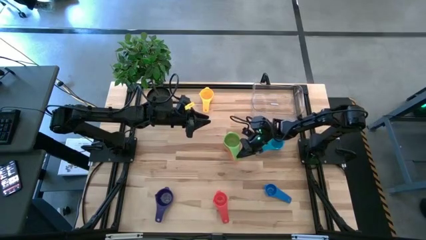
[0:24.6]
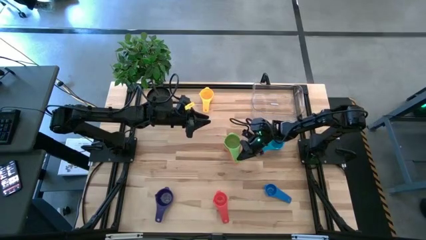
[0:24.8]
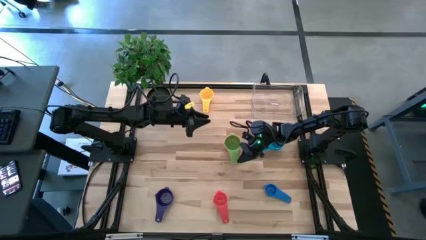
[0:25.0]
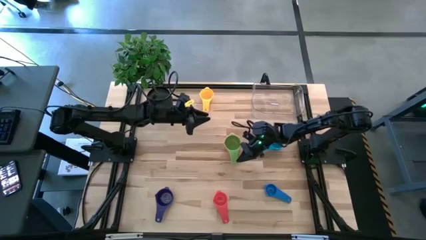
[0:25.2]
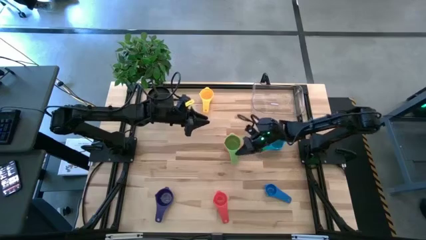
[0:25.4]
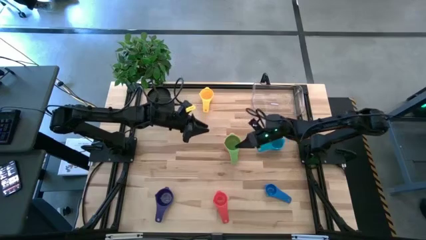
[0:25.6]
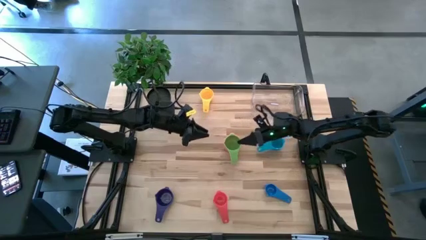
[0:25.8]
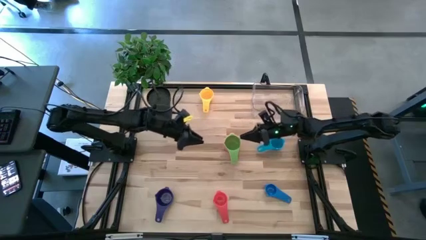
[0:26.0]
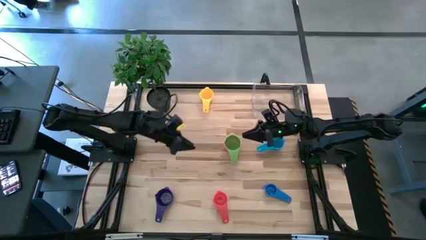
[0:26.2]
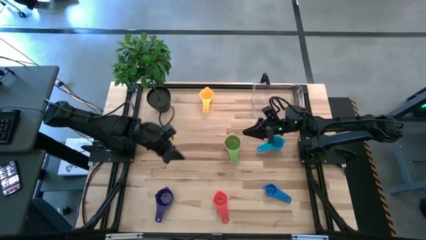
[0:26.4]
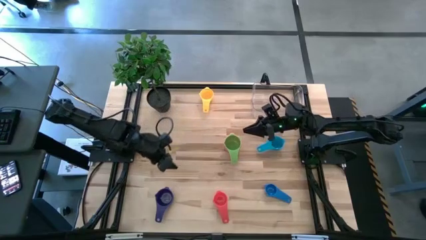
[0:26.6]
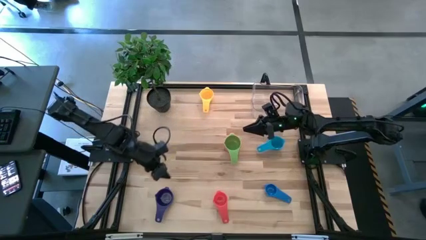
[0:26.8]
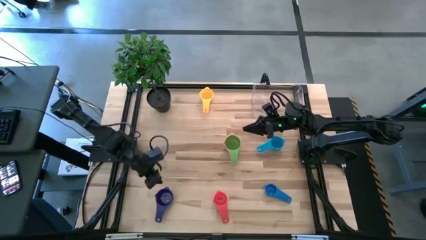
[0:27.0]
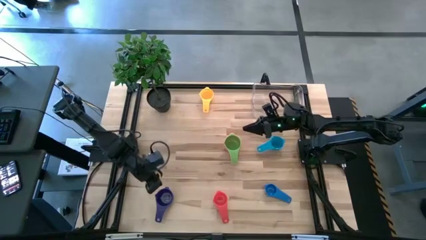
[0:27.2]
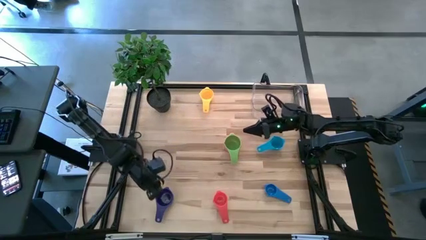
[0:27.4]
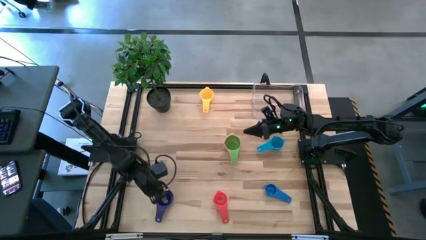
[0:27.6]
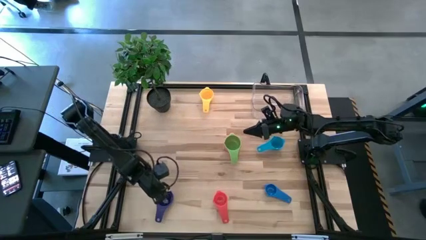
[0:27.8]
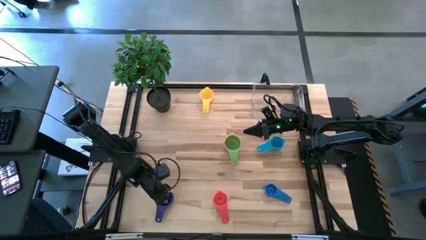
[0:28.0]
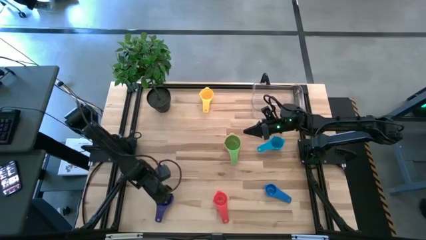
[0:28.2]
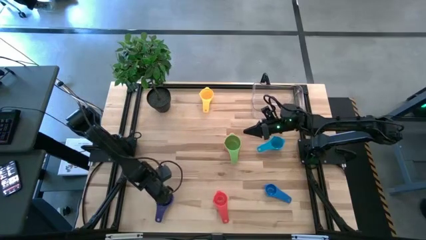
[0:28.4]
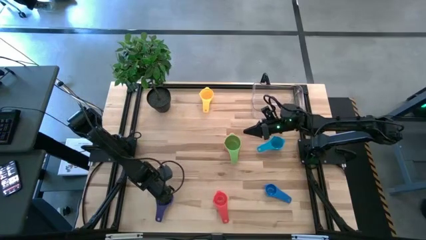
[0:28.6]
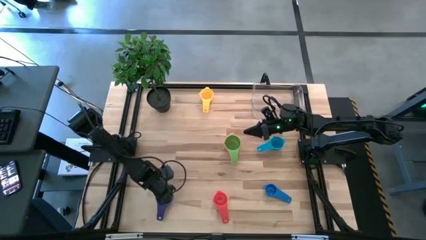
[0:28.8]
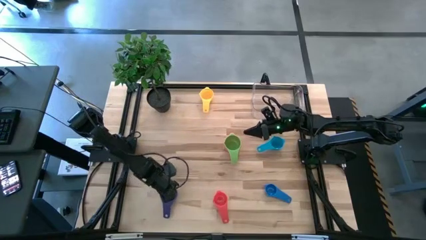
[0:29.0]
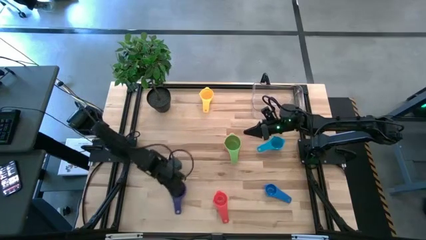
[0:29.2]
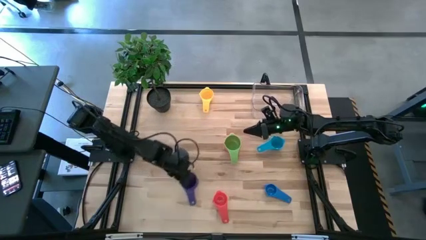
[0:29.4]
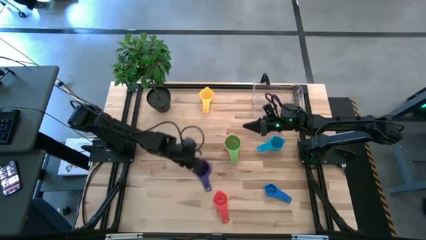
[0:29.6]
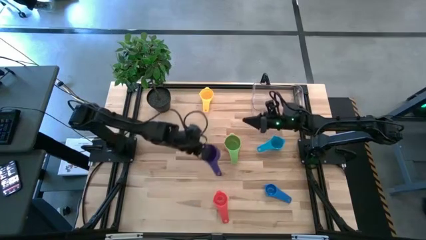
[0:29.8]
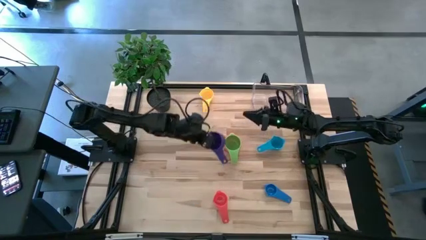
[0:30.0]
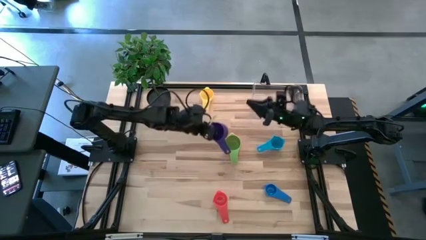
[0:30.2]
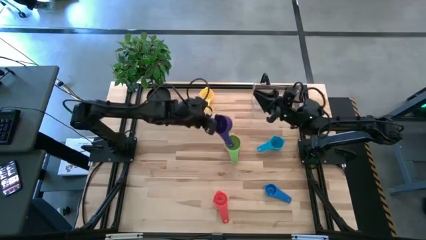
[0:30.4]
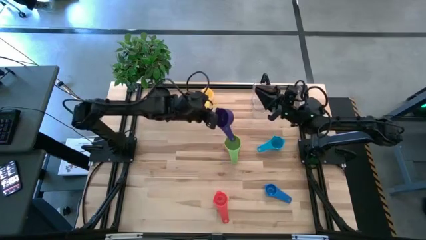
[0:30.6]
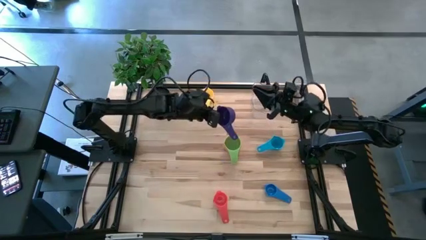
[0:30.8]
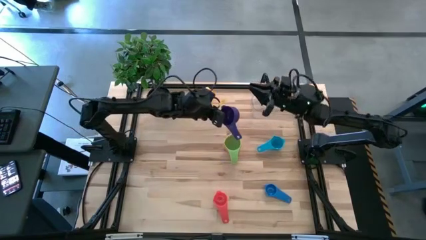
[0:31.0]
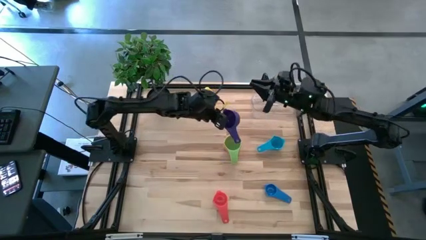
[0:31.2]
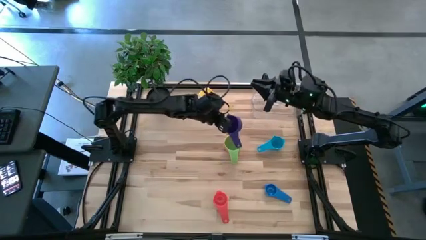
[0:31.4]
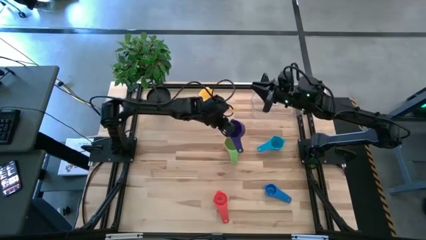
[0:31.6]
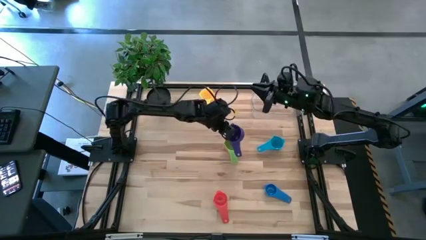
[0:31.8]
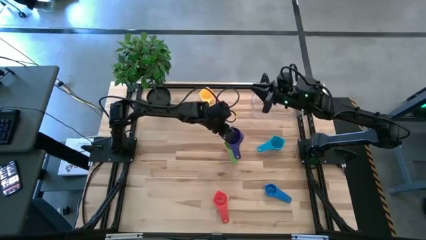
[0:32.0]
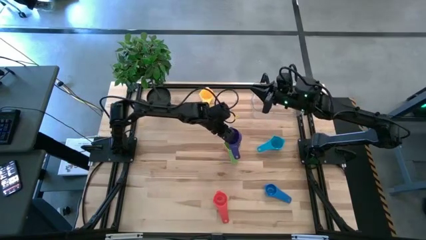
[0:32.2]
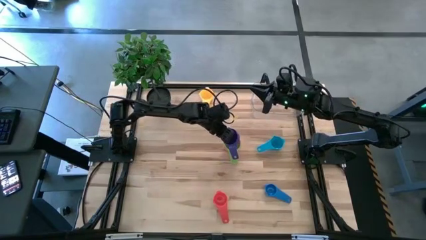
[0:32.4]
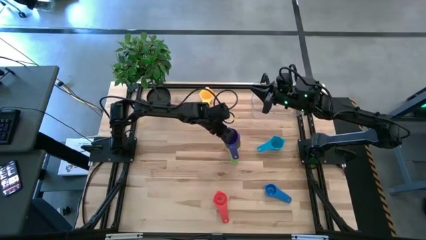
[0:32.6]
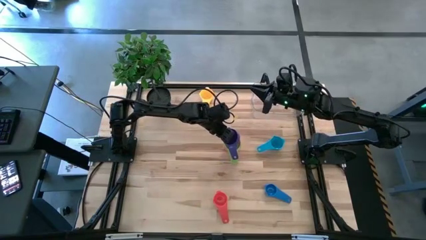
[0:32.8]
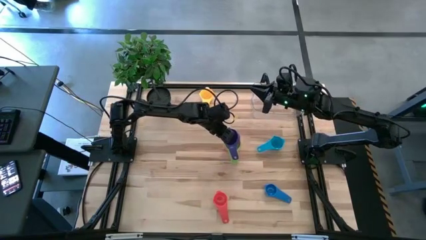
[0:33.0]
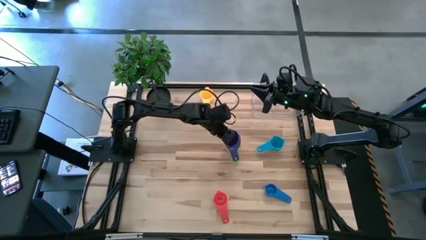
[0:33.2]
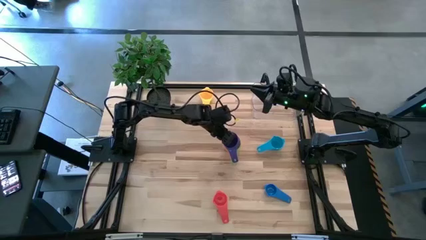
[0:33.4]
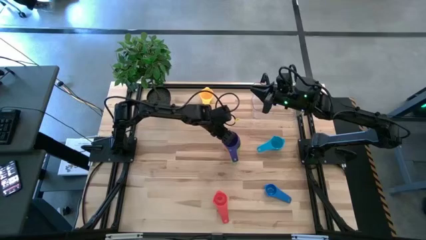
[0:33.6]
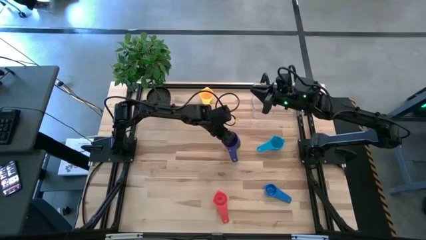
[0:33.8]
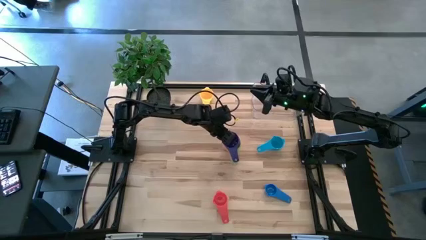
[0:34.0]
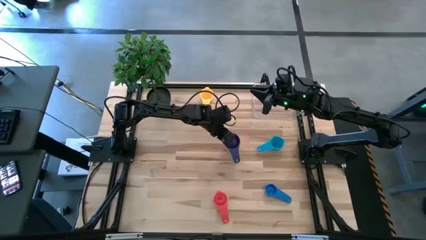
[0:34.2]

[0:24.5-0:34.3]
Task: Nest measuring cups in basket
Stack the dark blue measuring cup on the green measuring cup

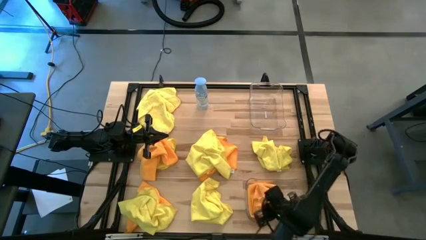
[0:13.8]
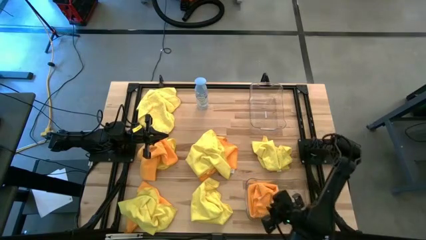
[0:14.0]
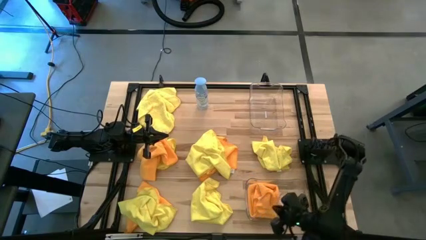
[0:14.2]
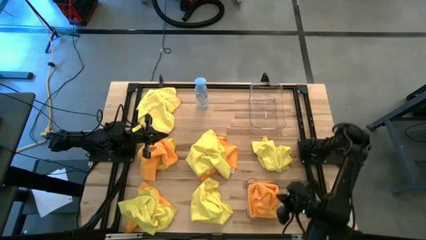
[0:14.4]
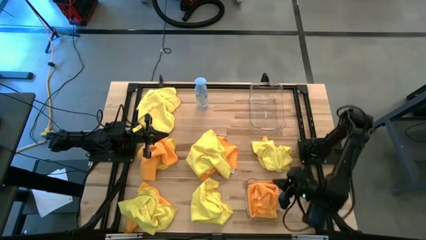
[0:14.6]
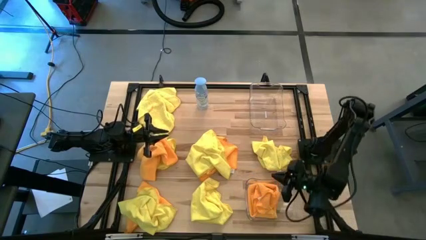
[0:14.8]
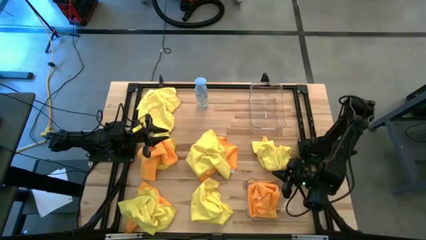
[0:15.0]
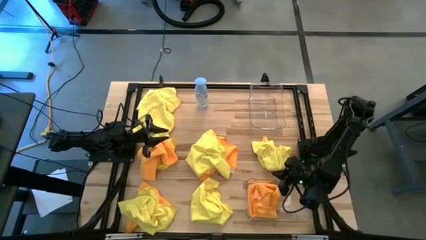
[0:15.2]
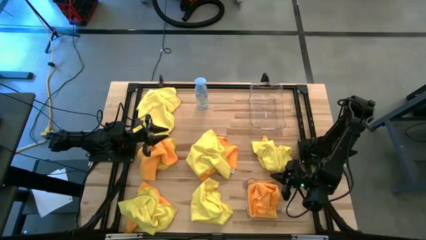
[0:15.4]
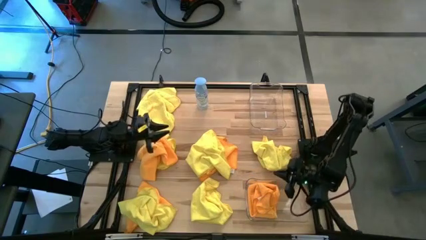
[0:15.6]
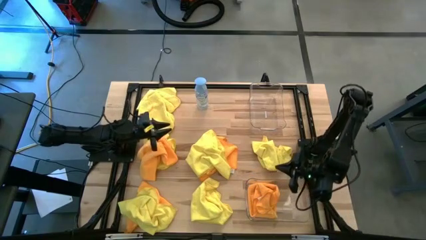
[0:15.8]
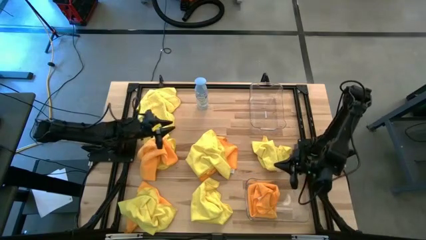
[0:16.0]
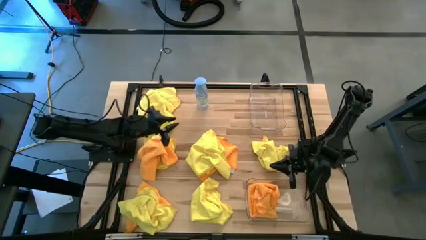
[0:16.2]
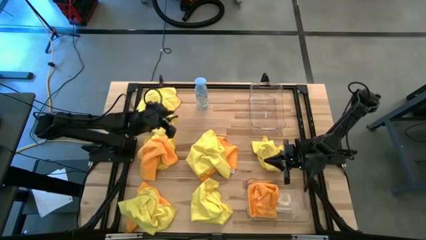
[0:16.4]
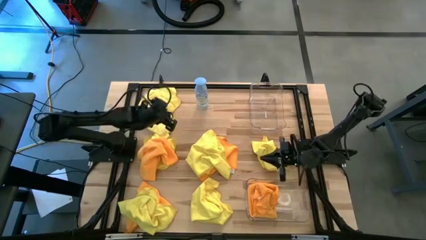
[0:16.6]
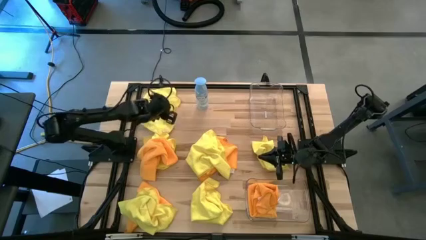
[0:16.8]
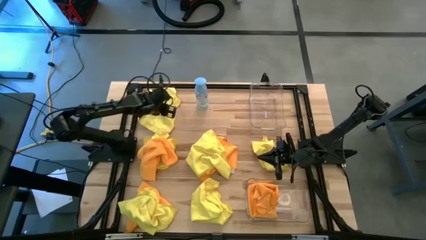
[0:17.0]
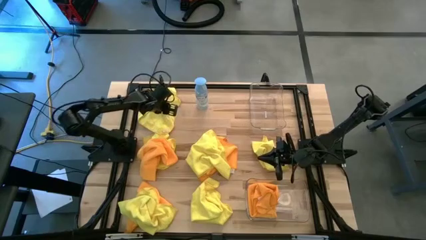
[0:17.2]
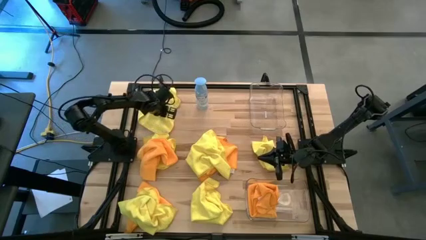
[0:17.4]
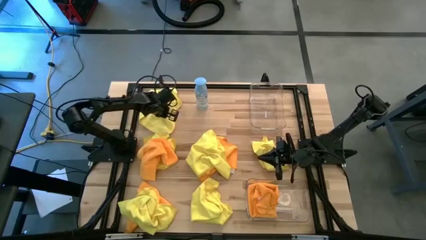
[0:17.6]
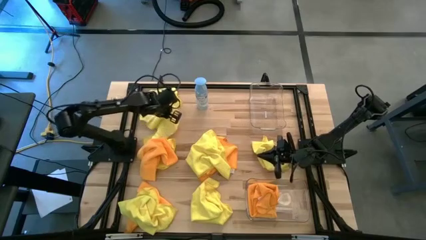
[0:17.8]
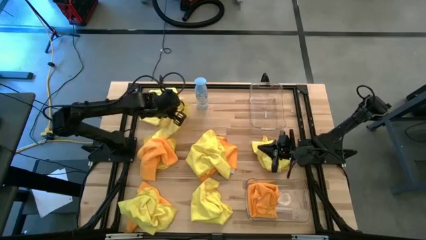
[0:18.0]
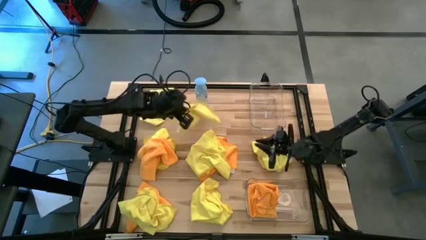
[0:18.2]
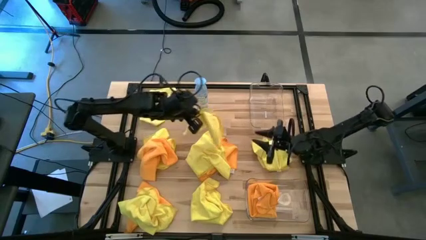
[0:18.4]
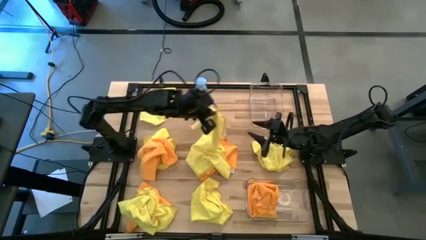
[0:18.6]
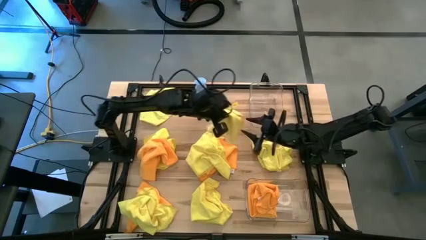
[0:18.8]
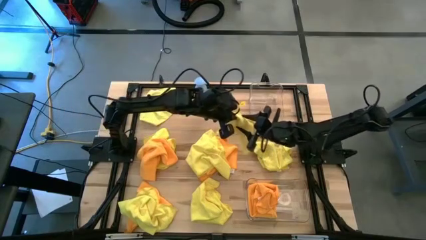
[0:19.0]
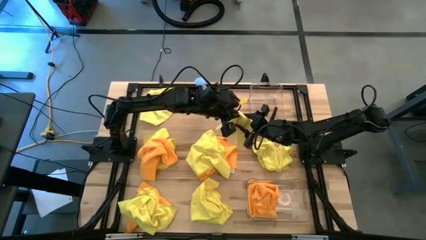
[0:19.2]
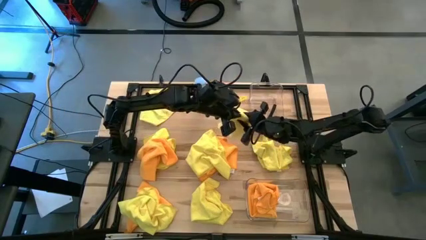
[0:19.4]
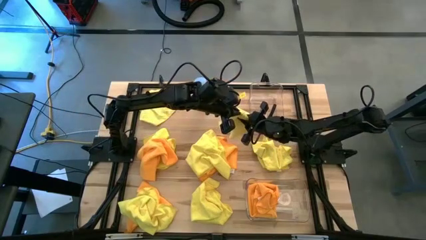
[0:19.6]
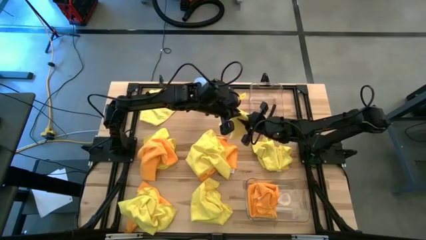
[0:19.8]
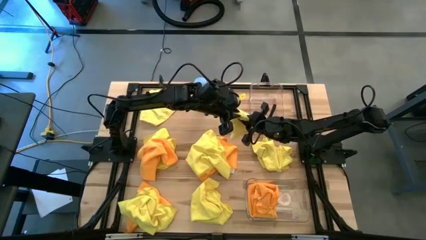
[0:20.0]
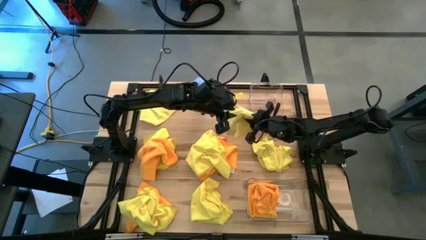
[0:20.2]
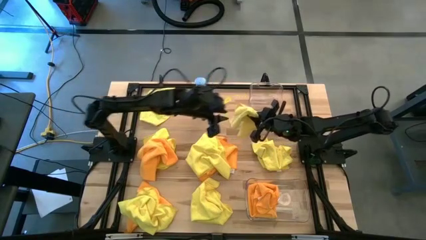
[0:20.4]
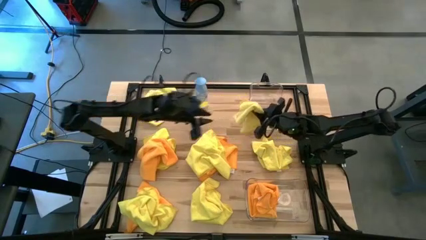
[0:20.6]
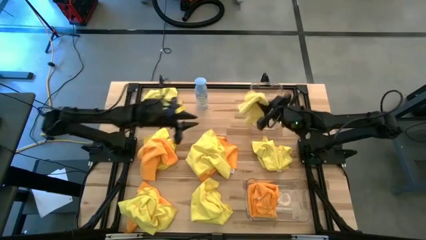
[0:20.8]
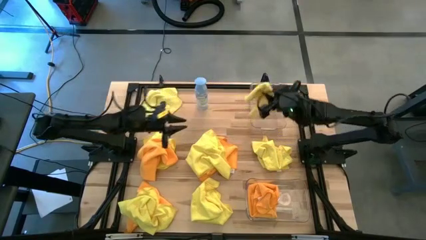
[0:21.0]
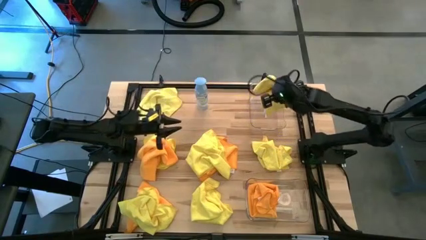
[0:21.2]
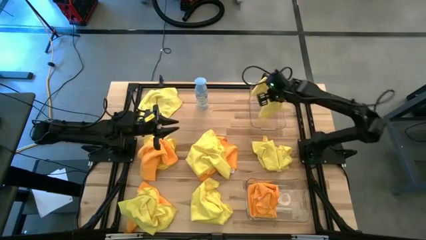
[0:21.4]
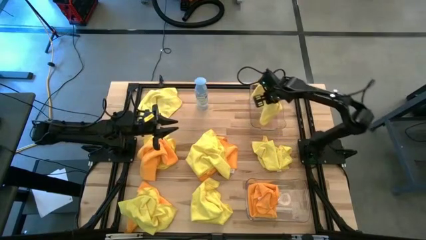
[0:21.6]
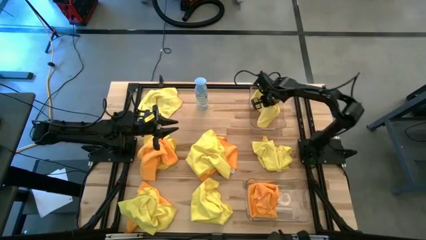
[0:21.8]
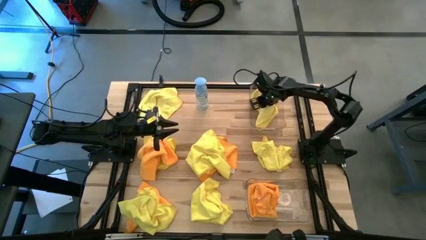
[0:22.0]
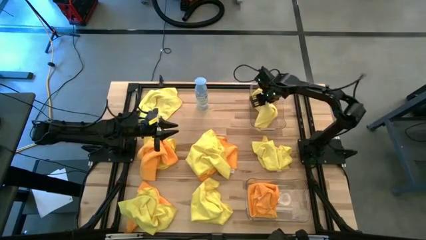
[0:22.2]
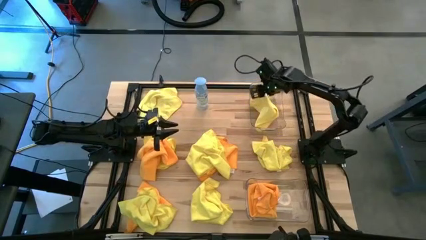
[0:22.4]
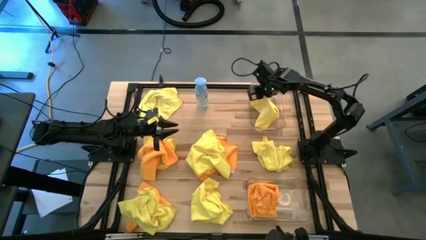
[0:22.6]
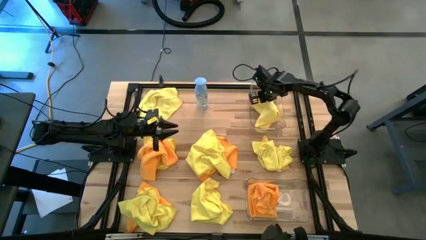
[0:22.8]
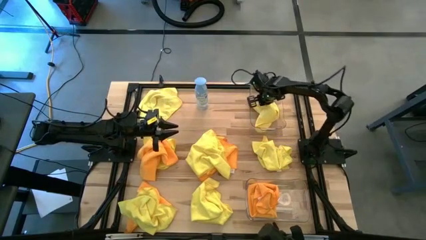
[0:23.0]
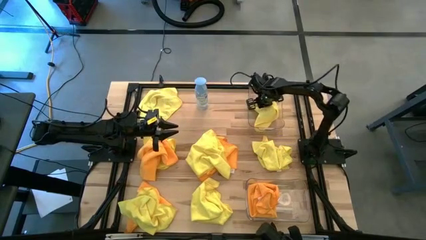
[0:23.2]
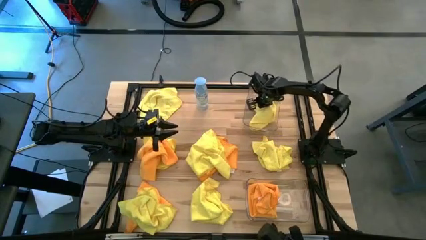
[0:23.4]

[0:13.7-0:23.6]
Task: Sort microfiber towel by color & place in baskets
Put the yellow microfiber cloth into the top transparent bin
